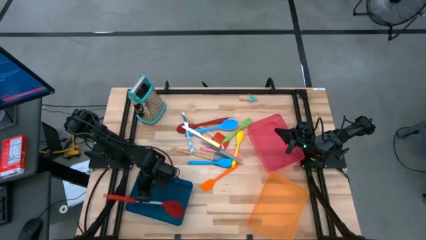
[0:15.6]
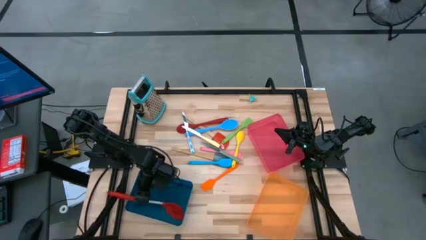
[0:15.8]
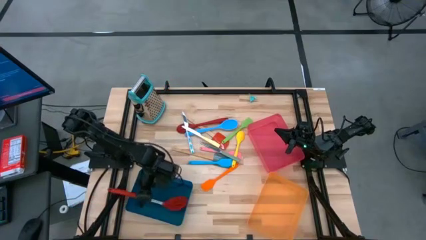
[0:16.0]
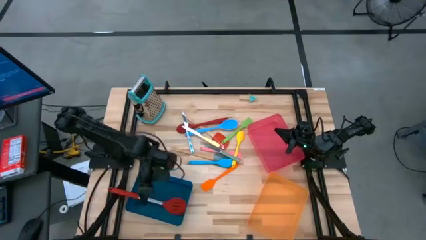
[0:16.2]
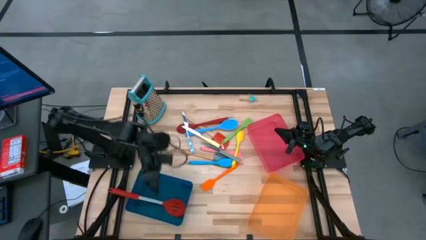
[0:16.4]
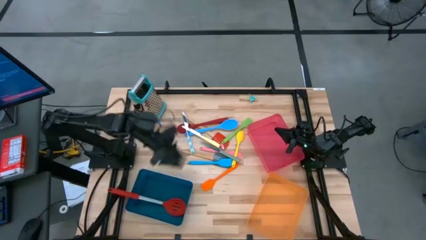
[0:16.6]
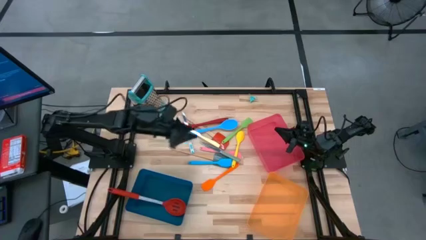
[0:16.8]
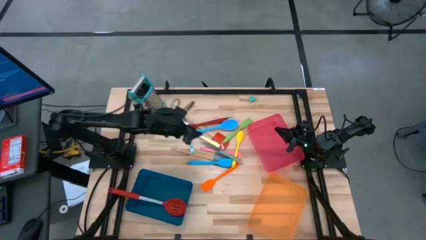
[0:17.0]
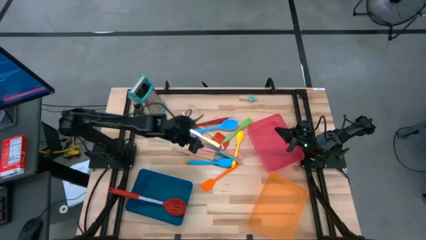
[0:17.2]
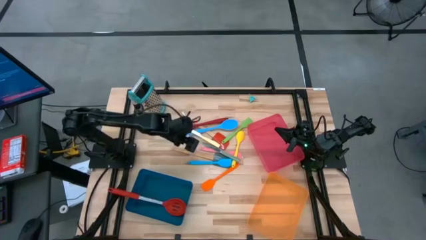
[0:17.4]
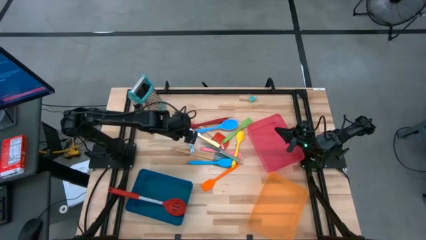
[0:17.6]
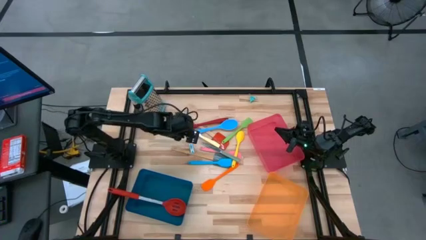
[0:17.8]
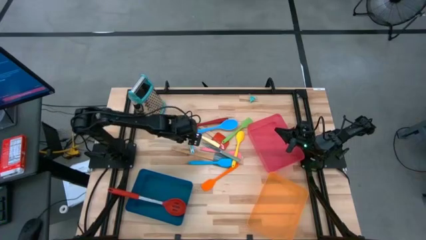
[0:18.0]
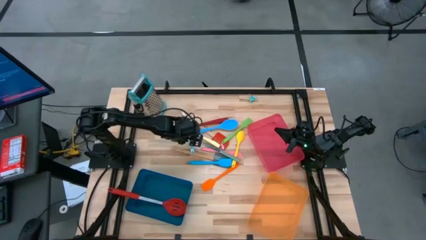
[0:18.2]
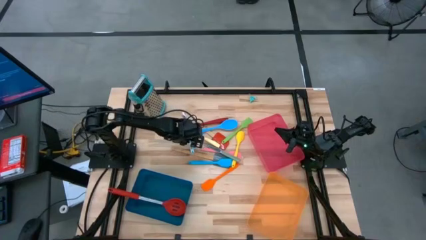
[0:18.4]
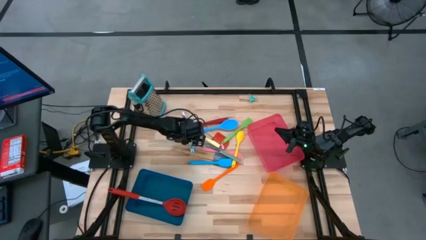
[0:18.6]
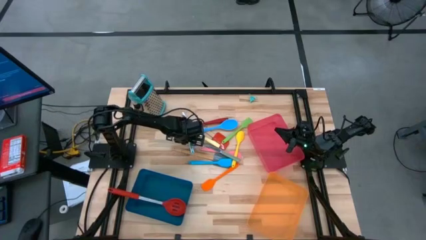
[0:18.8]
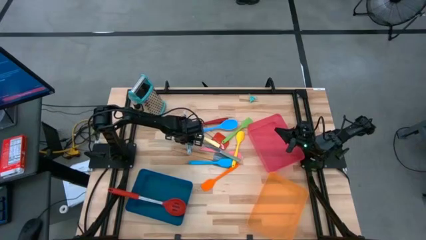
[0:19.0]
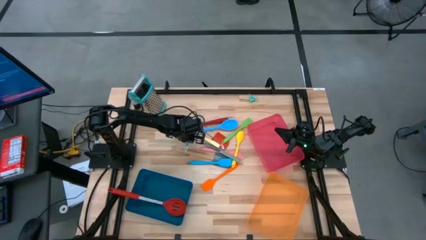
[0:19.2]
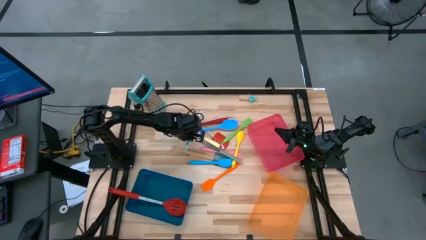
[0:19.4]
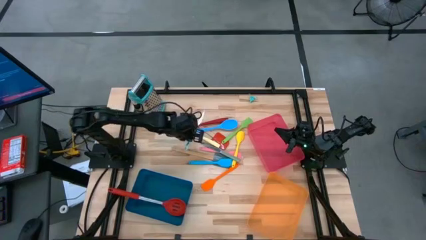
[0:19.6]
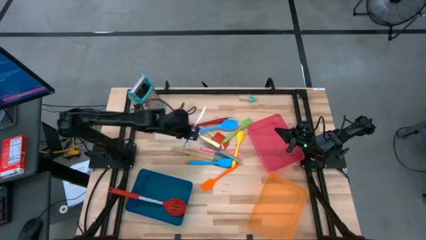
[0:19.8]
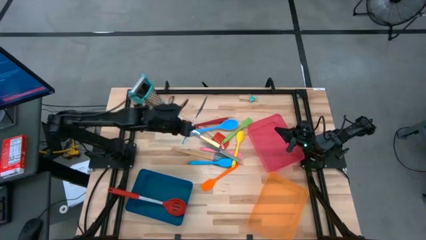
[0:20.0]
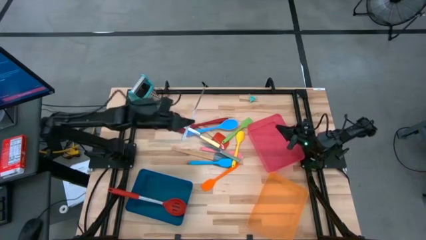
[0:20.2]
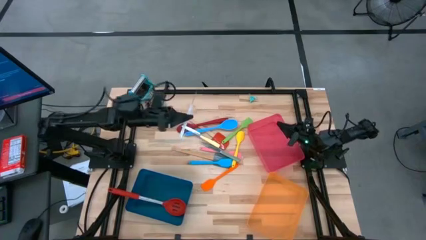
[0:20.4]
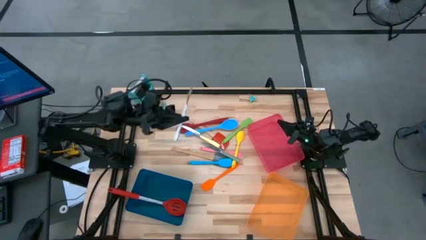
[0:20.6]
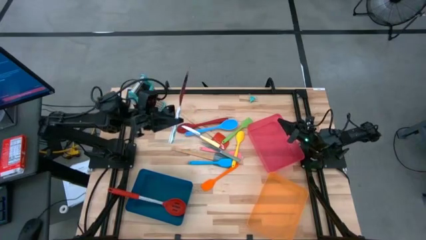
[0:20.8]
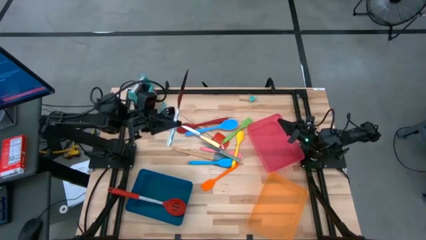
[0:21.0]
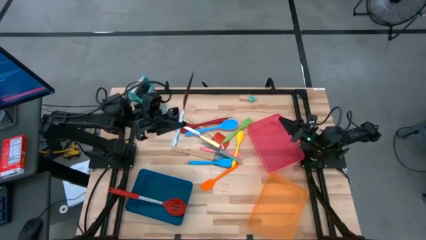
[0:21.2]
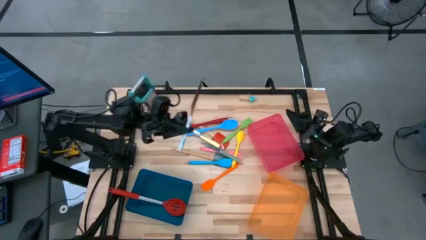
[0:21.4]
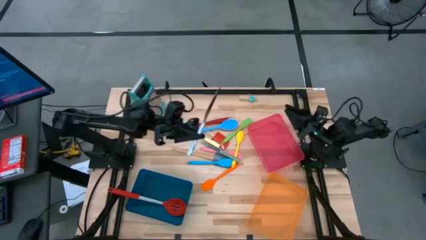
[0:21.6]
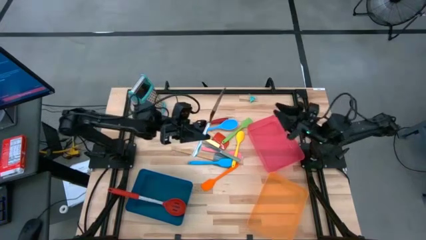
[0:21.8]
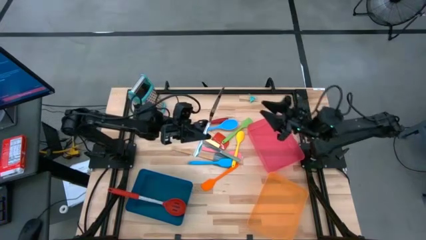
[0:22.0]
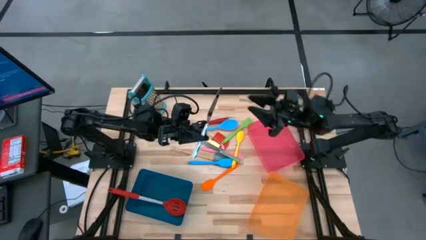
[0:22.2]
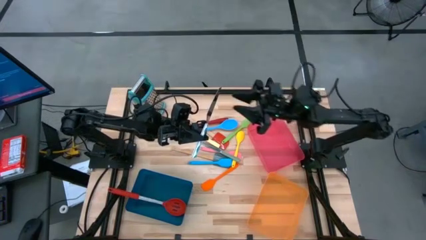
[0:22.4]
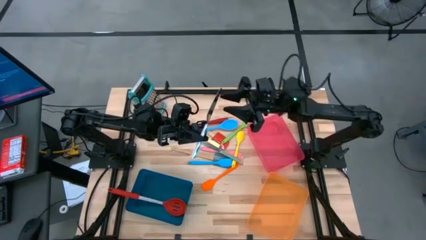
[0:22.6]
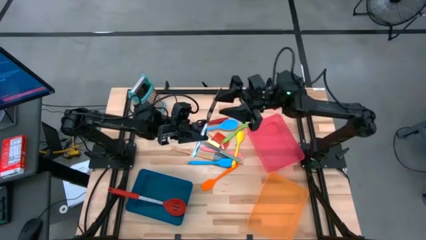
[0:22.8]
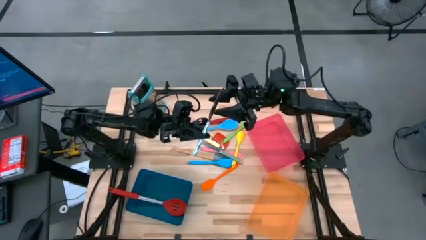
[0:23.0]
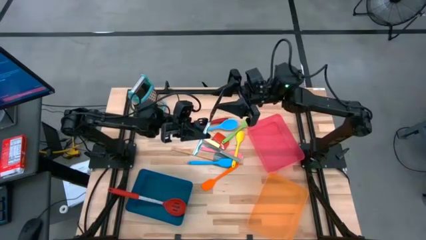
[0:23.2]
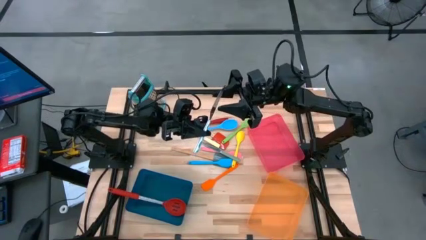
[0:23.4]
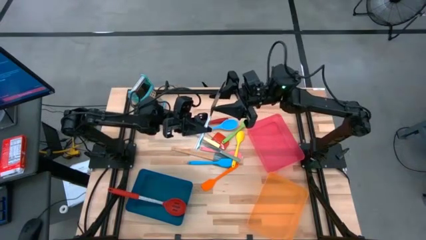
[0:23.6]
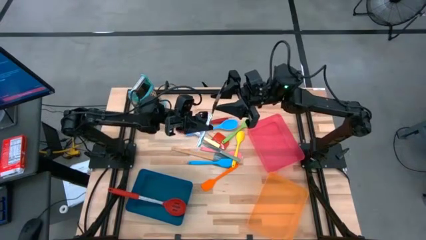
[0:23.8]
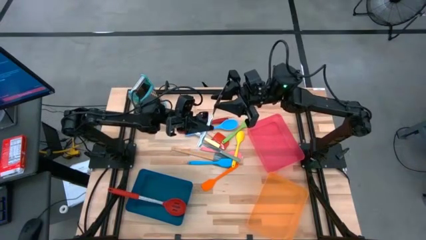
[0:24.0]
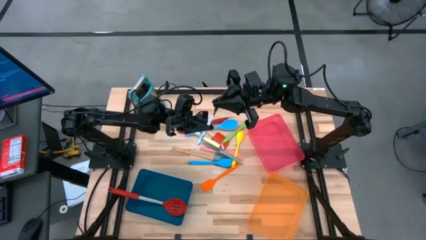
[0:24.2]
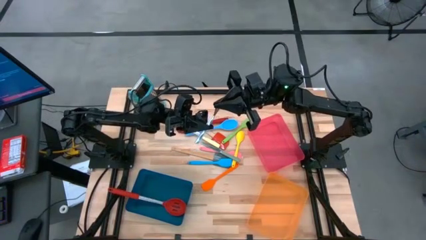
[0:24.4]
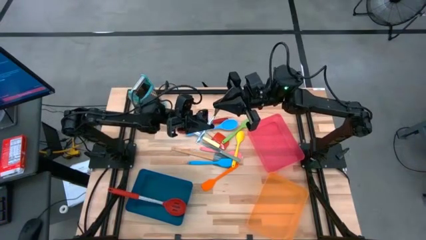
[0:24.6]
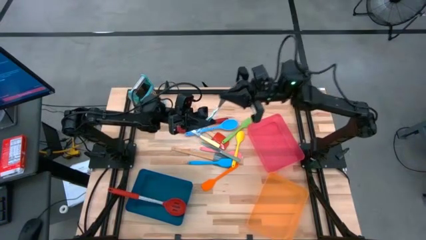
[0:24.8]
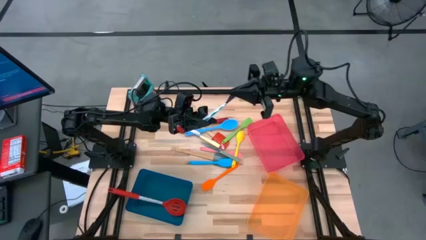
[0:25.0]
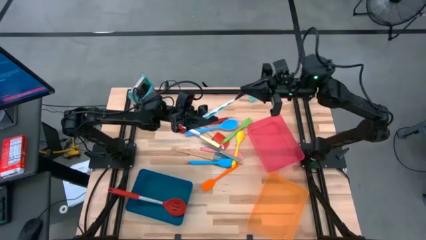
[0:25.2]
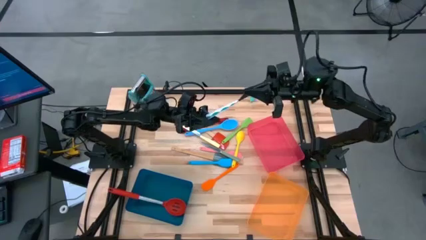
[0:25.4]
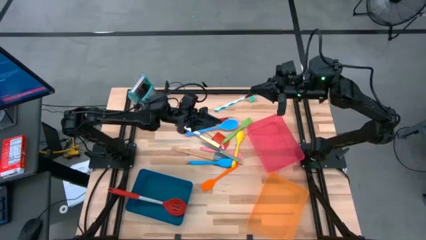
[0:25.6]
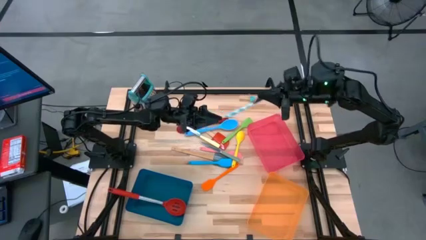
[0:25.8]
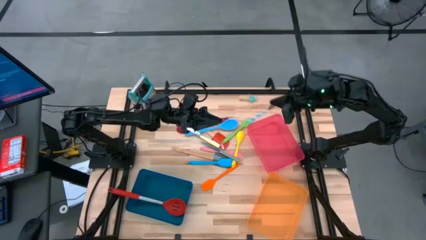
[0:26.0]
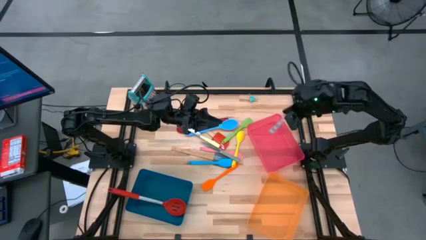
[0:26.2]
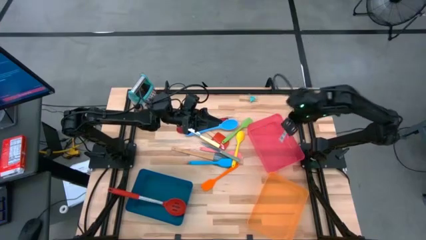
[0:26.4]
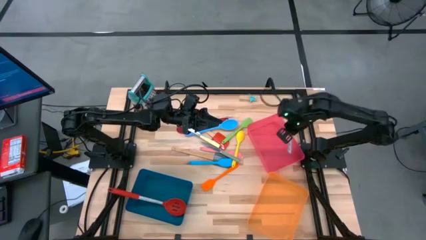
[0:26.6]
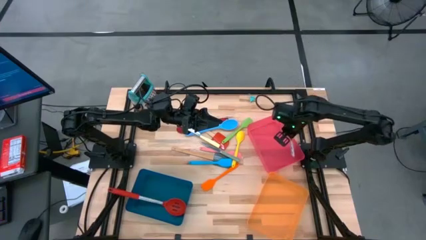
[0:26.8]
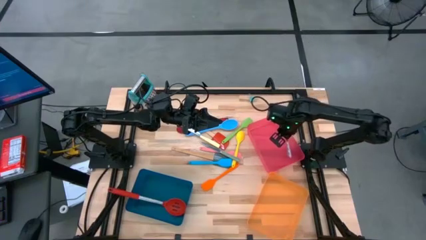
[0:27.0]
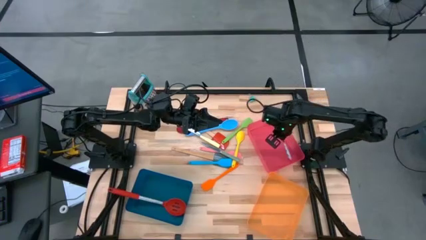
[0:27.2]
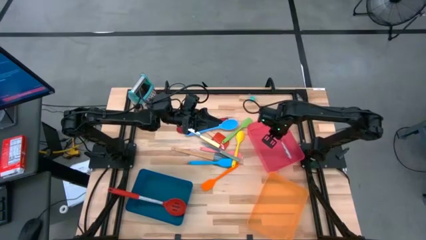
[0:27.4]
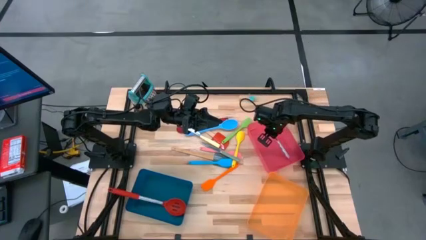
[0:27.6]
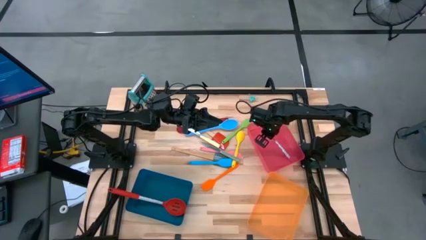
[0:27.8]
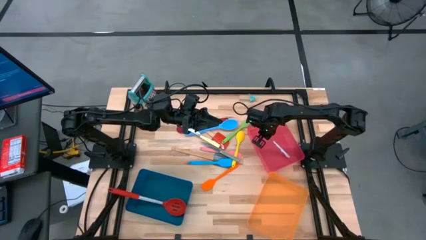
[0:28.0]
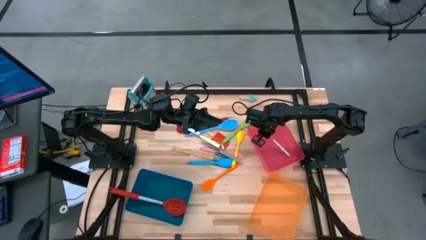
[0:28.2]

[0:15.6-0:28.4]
Task: Pick & Place Kitchen Items
Put the blue patterned table knife into the red bin
